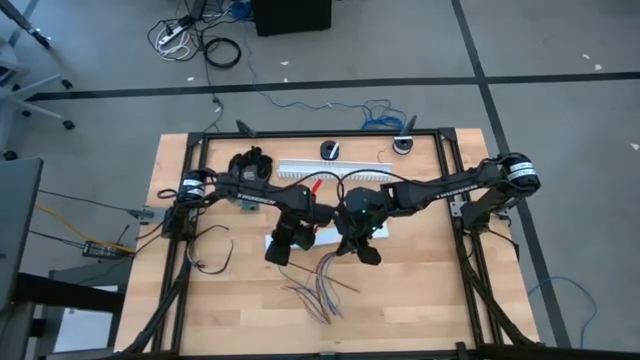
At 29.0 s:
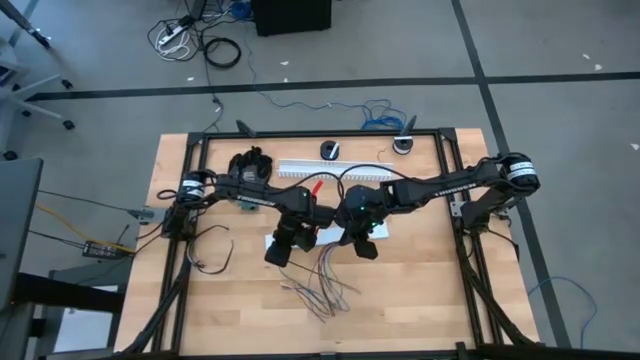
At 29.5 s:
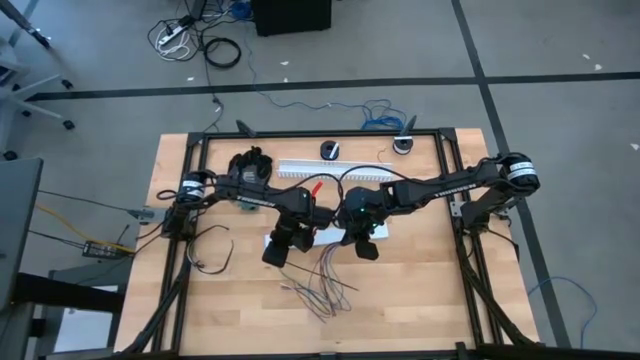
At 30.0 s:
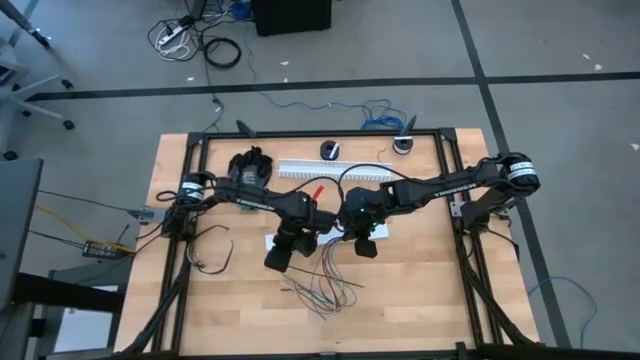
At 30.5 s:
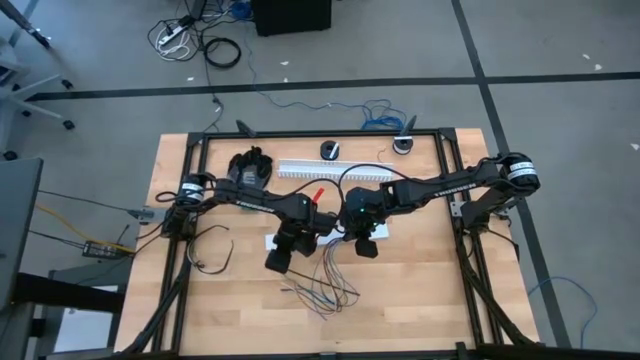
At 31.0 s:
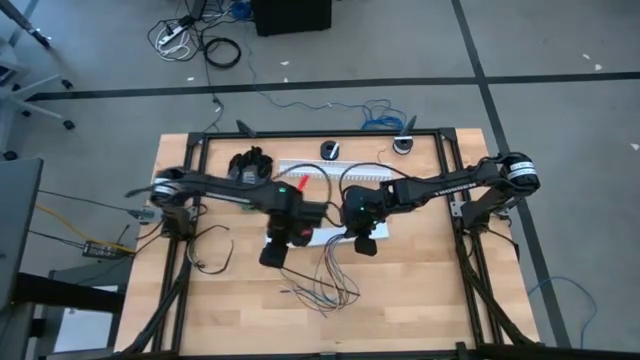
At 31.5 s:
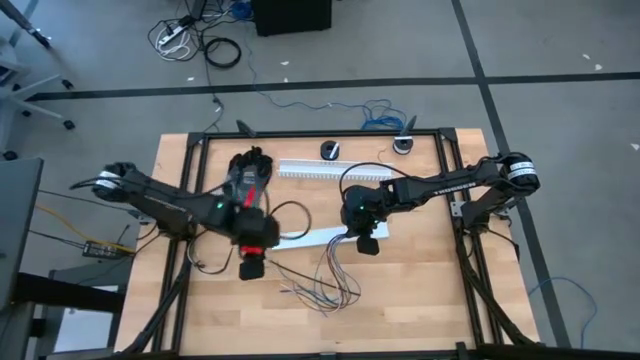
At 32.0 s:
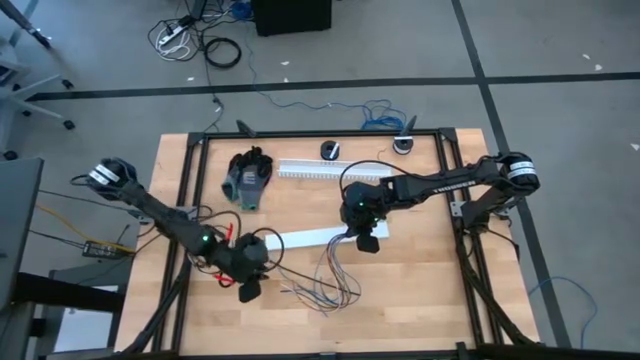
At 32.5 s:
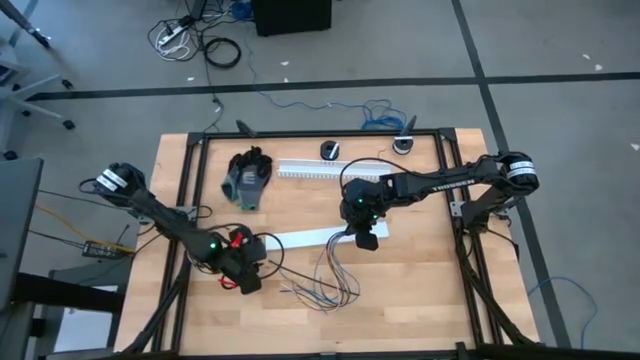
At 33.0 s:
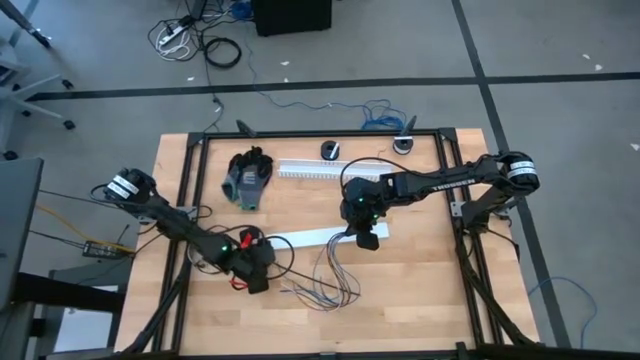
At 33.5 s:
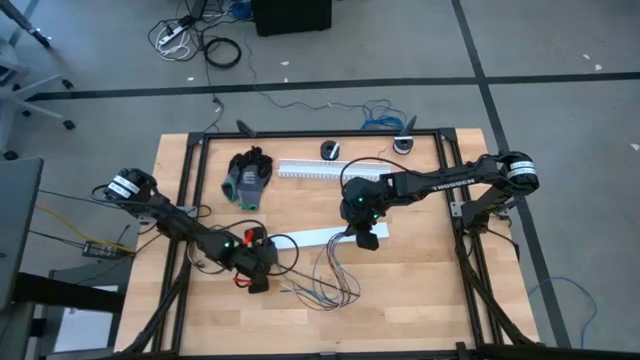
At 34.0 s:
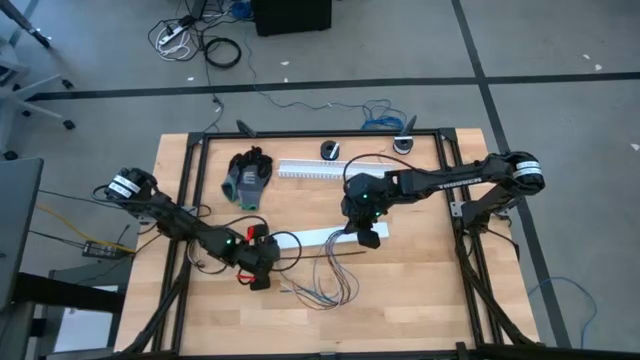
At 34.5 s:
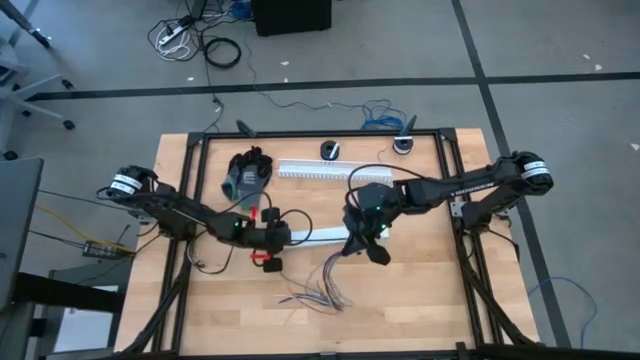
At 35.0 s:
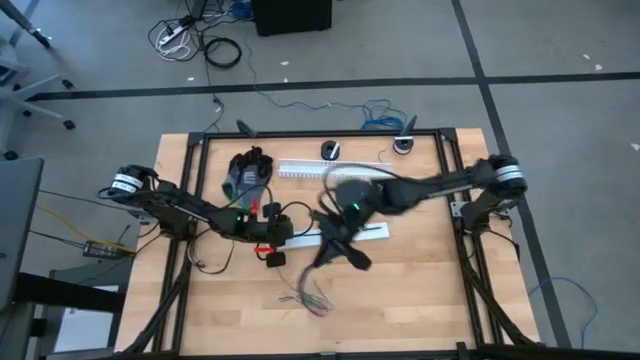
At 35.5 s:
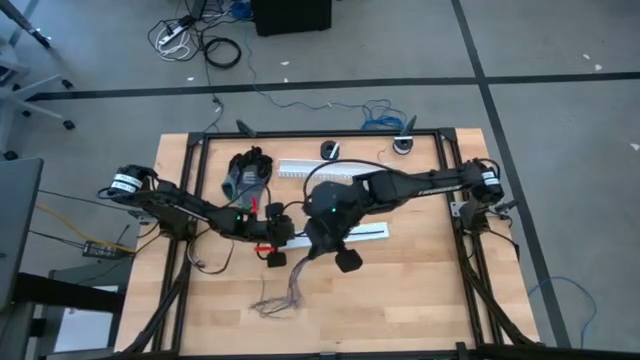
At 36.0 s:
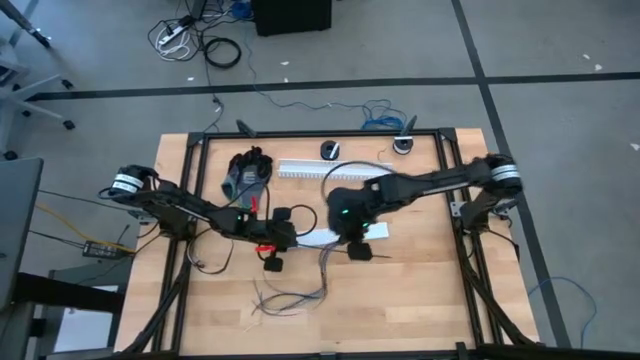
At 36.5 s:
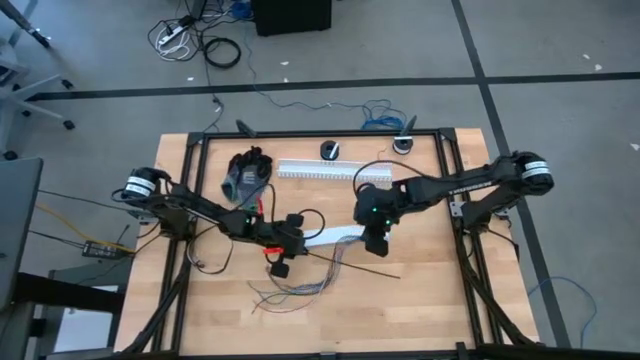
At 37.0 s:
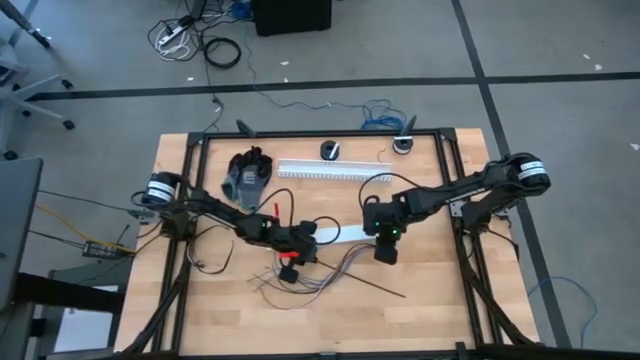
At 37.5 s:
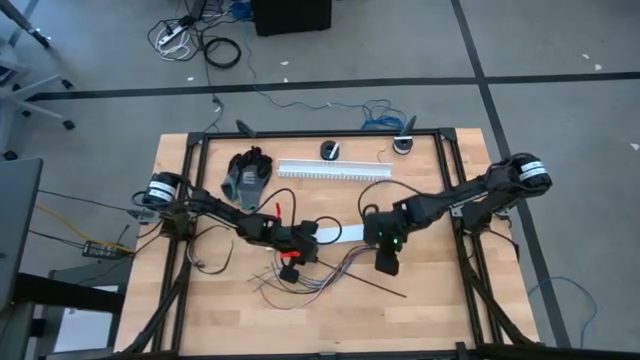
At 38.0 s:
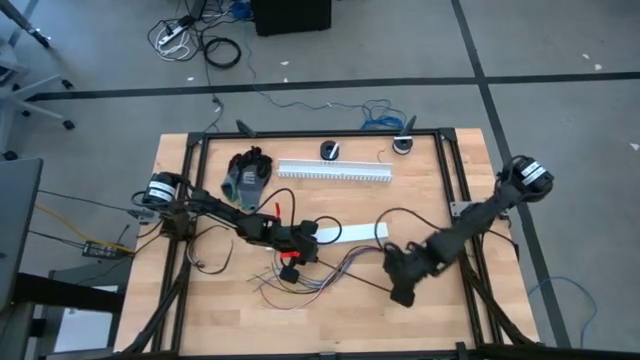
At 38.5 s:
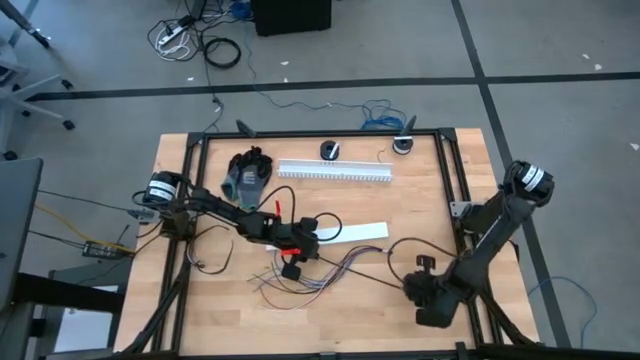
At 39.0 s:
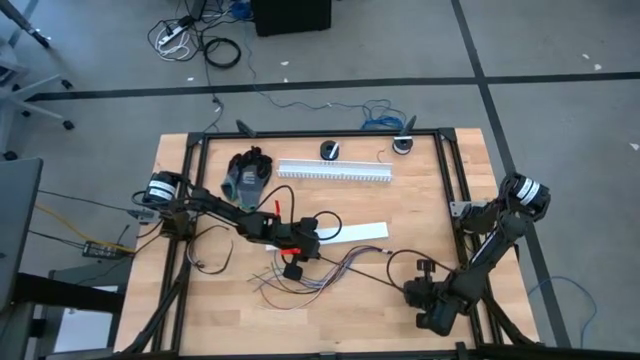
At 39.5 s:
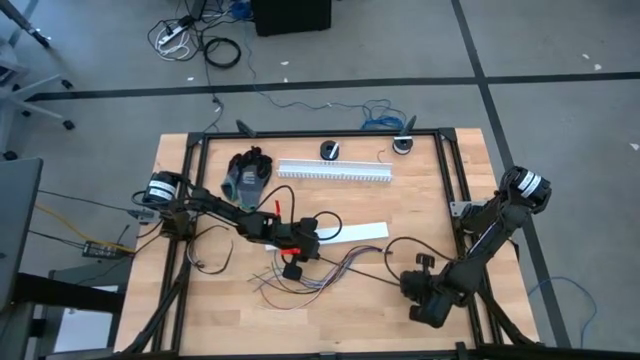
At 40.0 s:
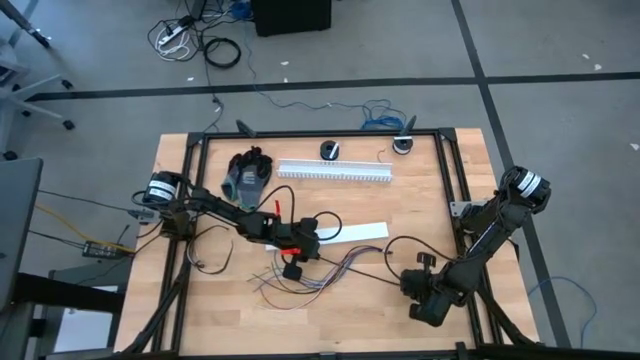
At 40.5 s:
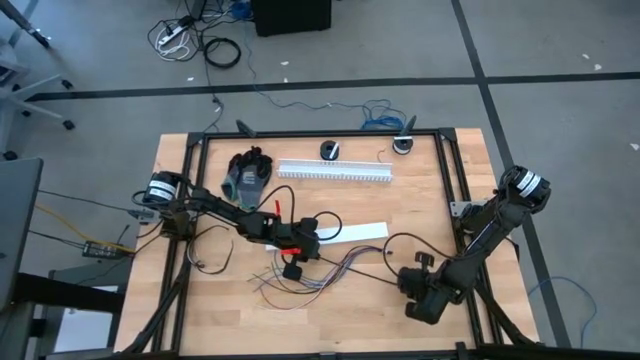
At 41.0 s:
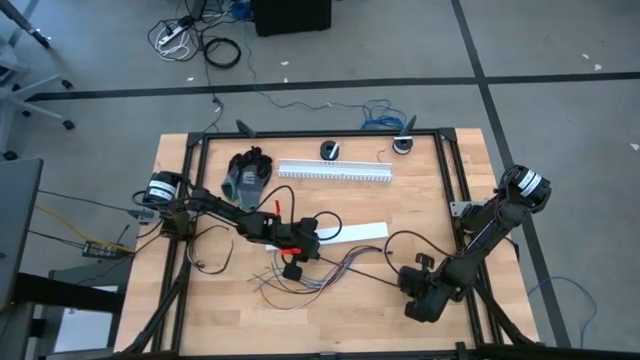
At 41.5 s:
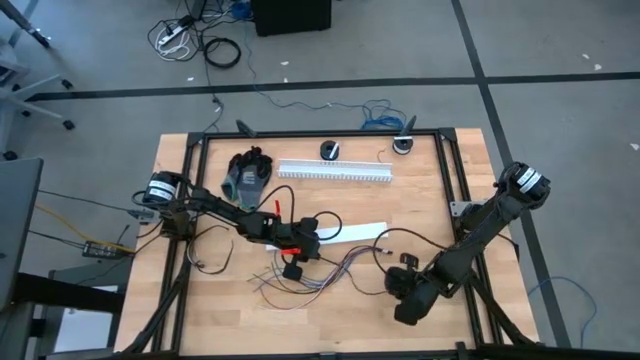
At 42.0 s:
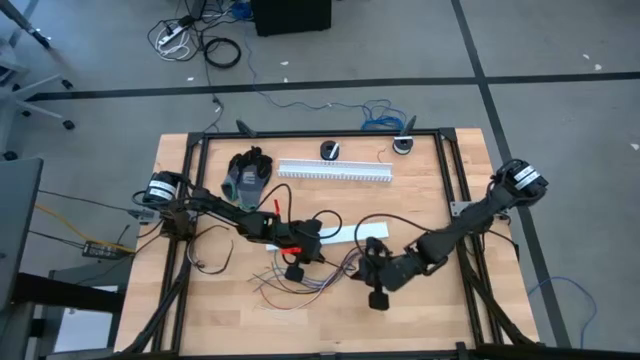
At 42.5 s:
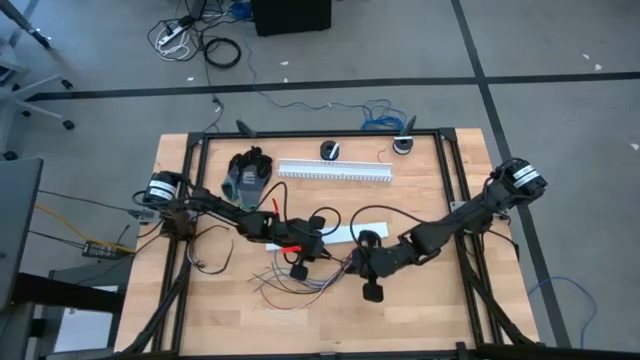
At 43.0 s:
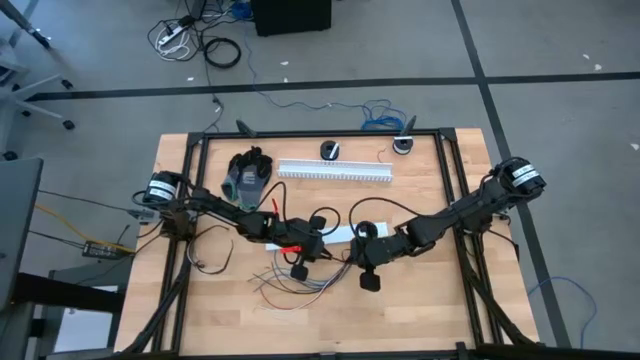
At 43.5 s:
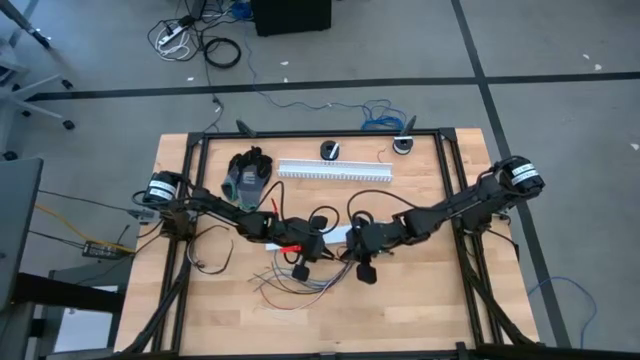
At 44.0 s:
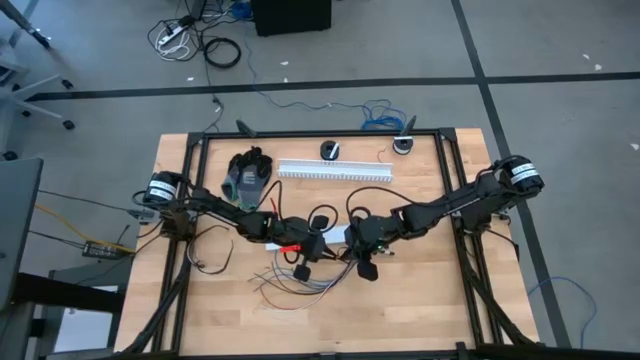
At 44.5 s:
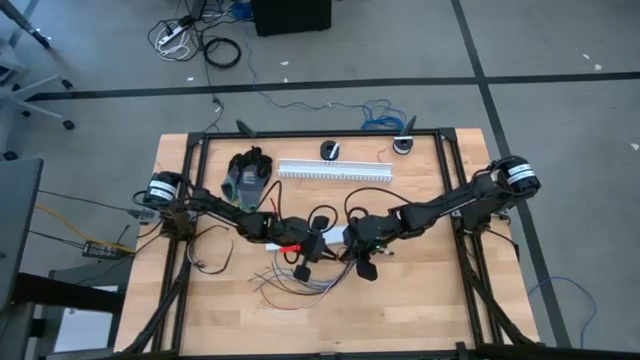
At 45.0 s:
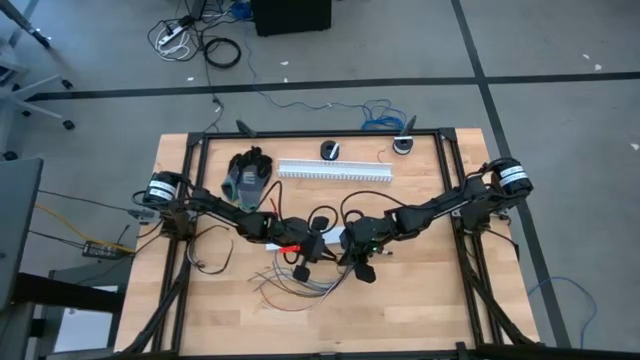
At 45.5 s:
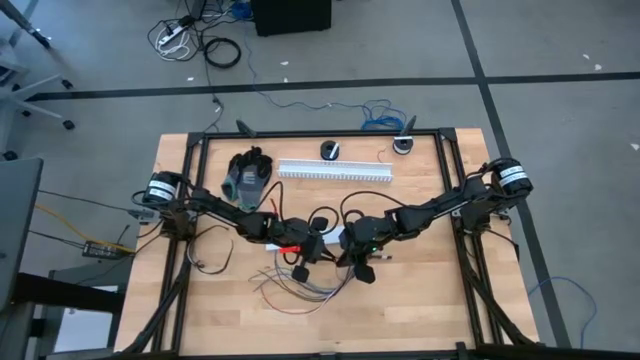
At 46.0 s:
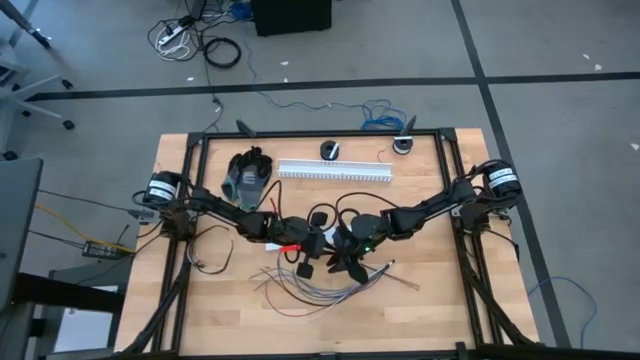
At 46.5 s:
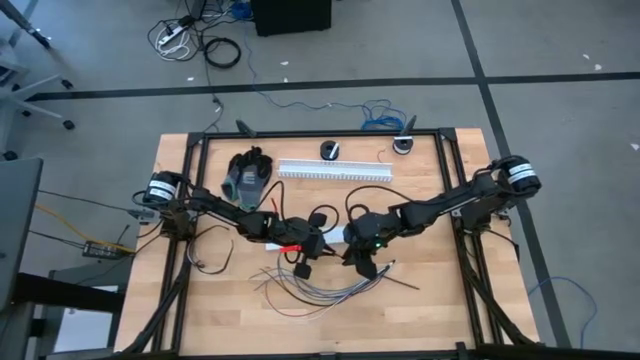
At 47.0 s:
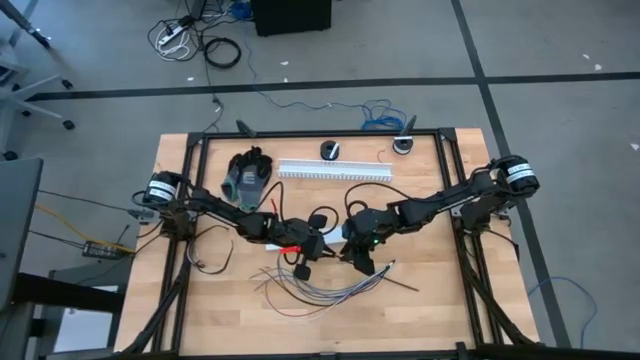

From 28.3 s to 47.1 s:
Task: Ziptie cables
Wrap the black zip tie around the cables

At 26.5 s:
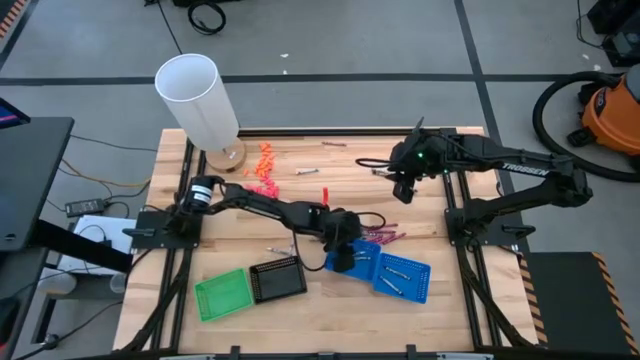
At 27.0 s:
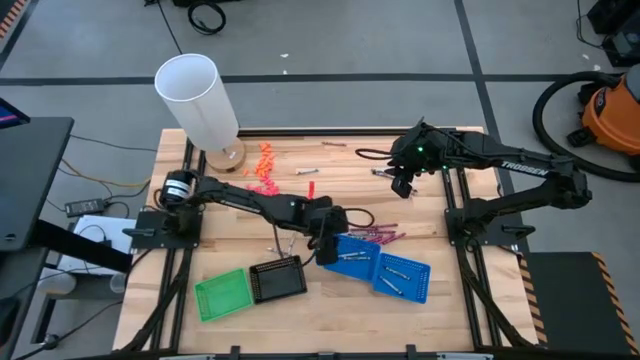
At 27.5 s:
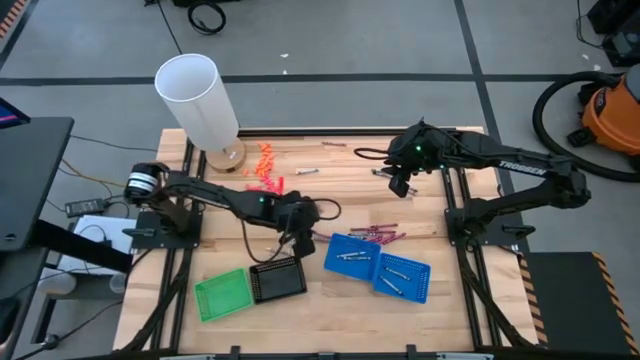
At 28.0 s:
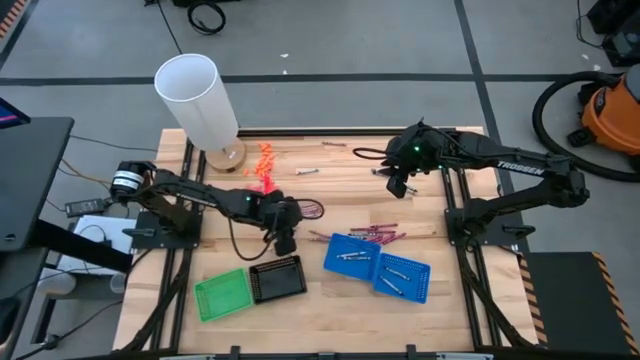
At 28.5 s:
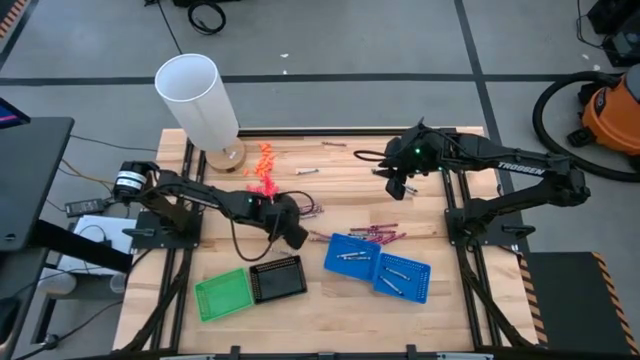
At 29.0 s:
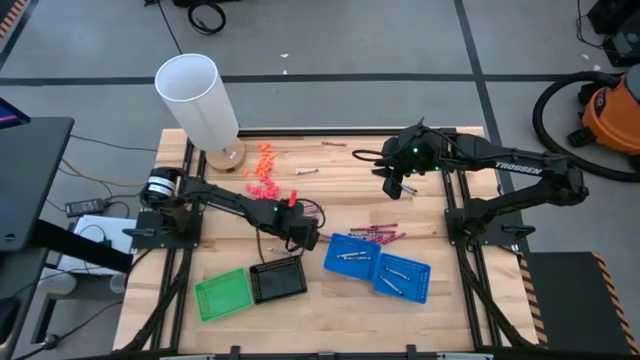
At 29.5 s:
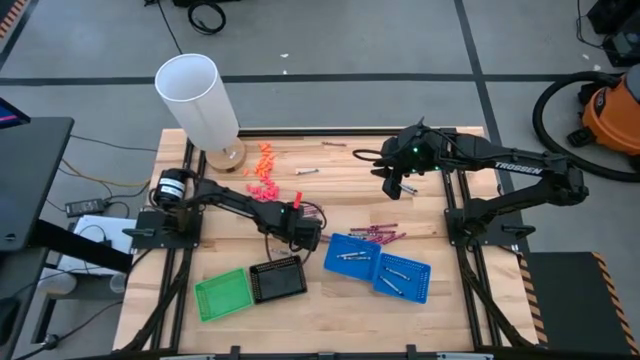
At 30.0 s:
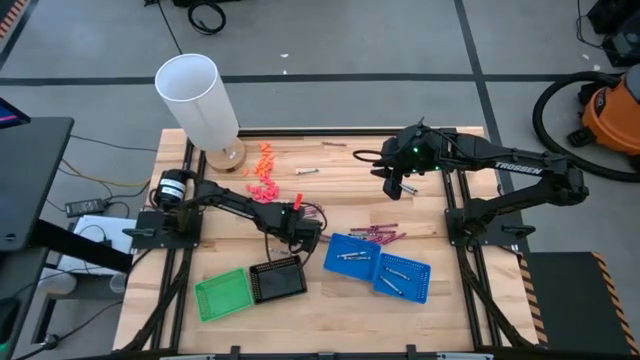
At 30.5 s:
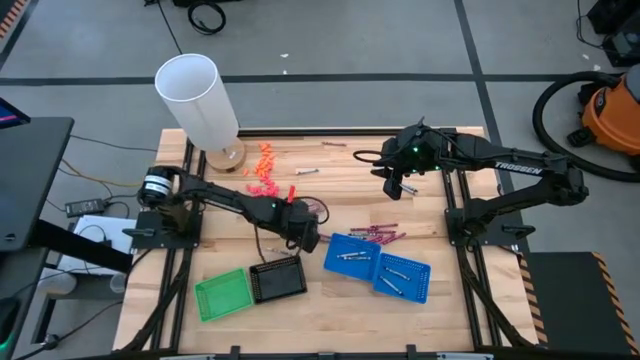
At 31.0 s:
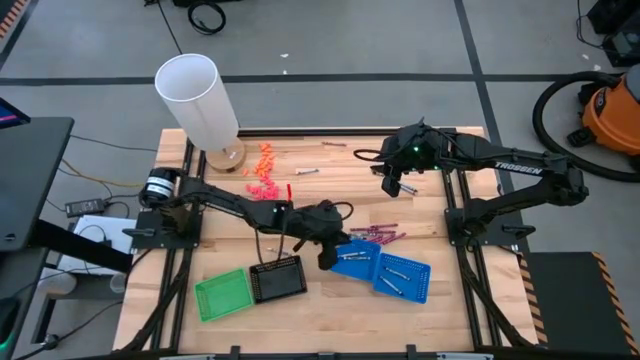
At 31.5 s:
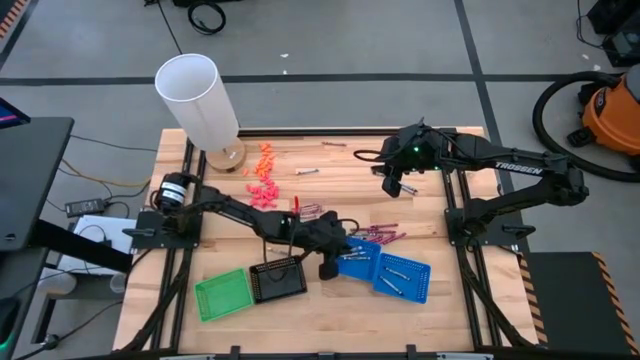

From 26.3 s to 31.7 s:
Task: Sort crayons
Put the white crayon into the left blue bin
